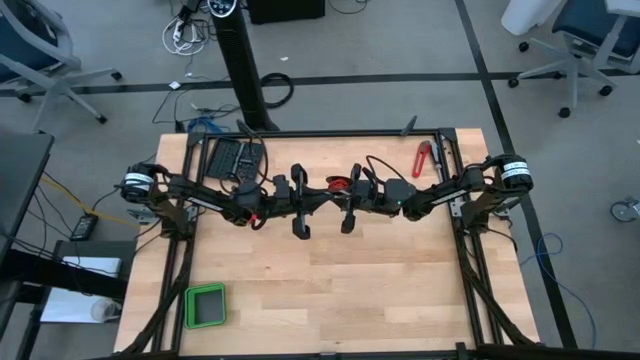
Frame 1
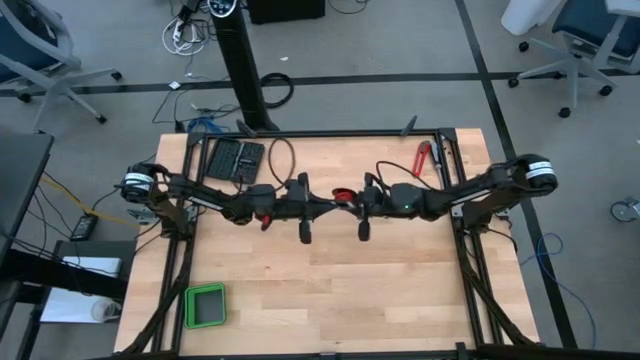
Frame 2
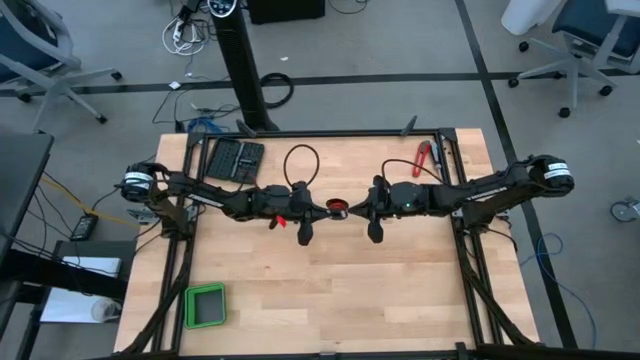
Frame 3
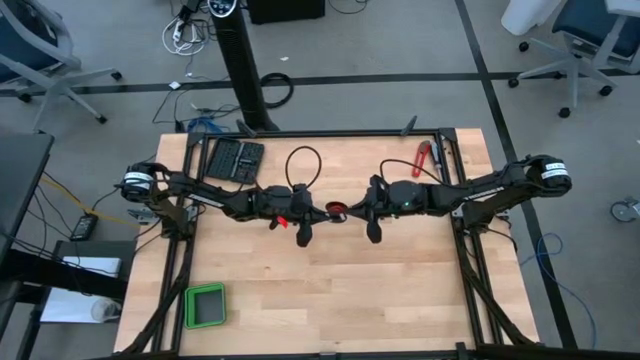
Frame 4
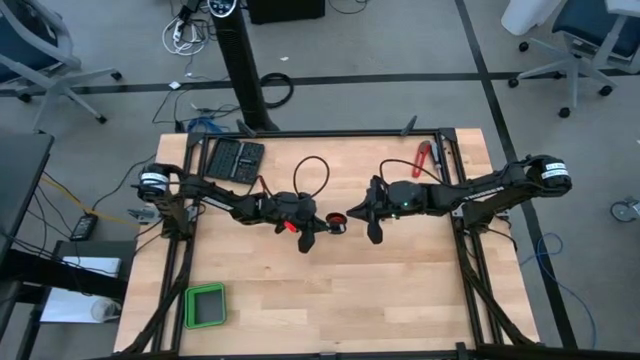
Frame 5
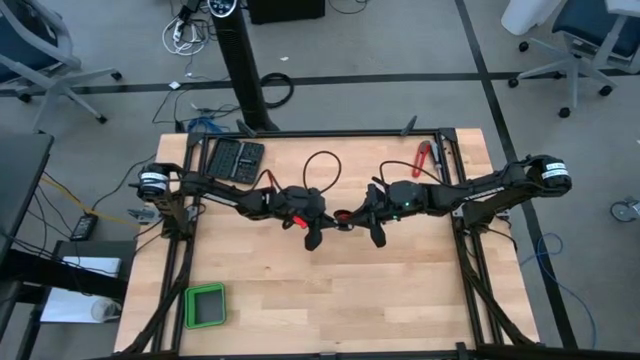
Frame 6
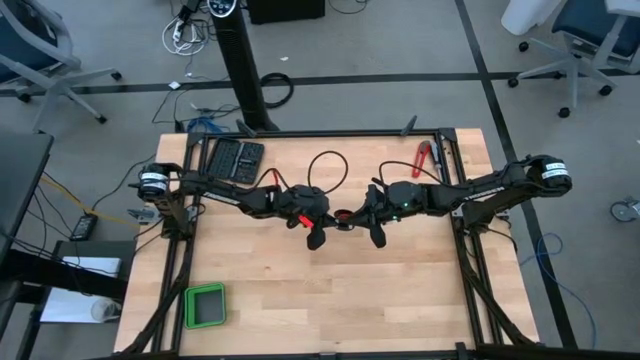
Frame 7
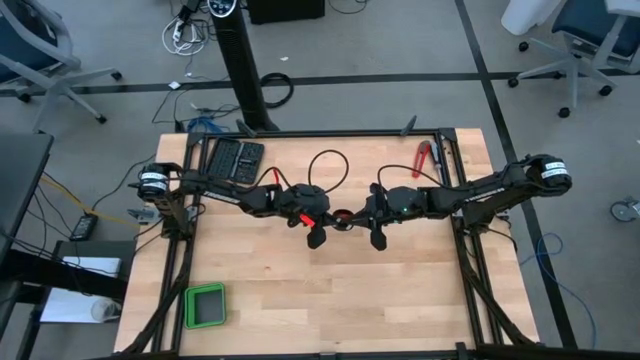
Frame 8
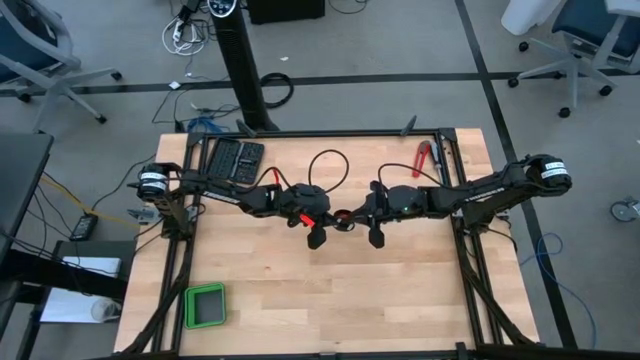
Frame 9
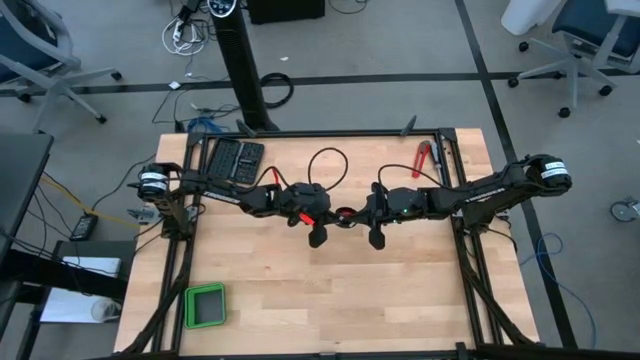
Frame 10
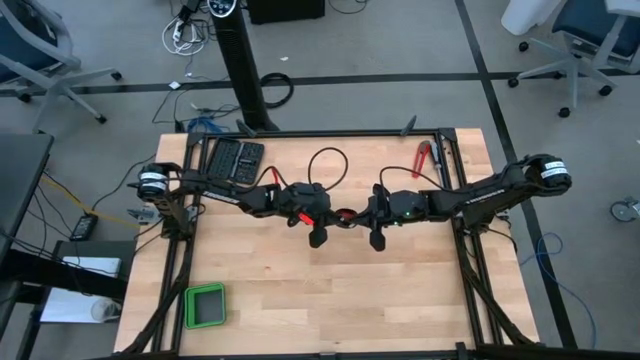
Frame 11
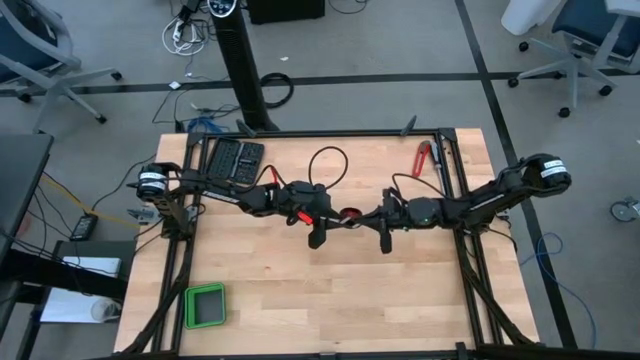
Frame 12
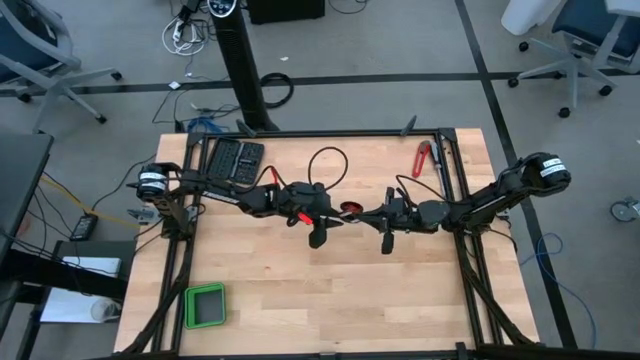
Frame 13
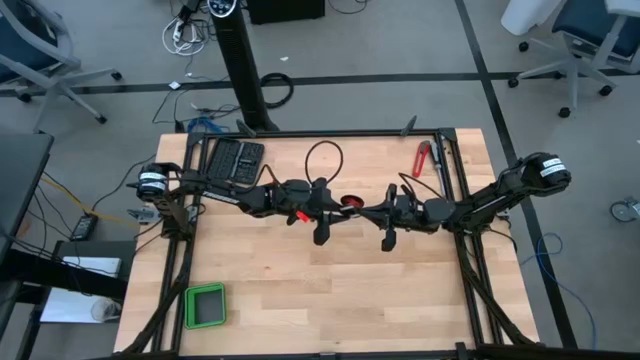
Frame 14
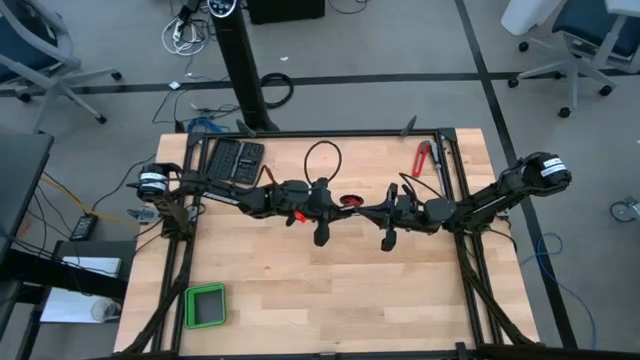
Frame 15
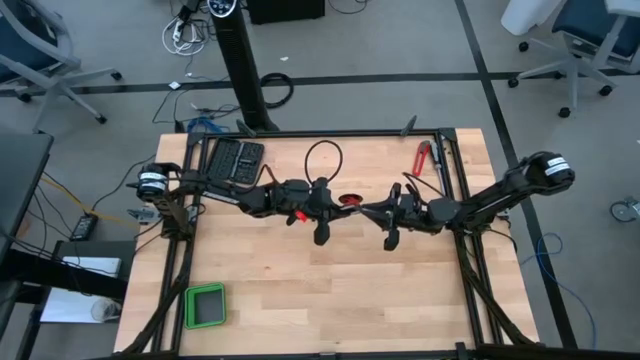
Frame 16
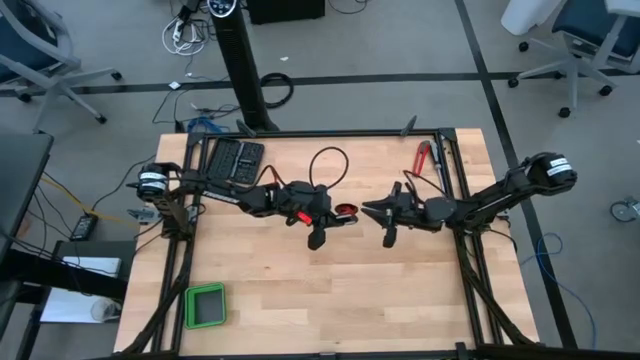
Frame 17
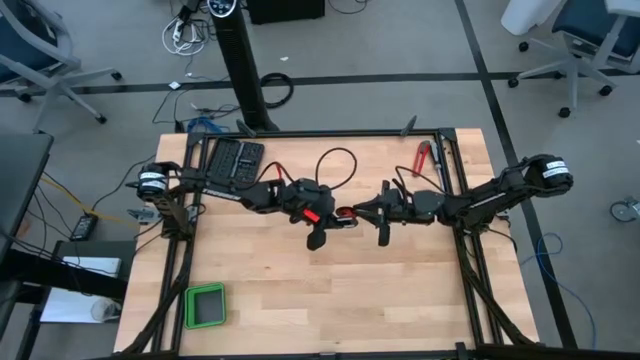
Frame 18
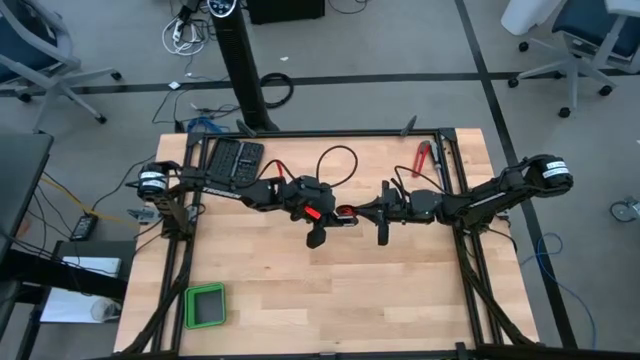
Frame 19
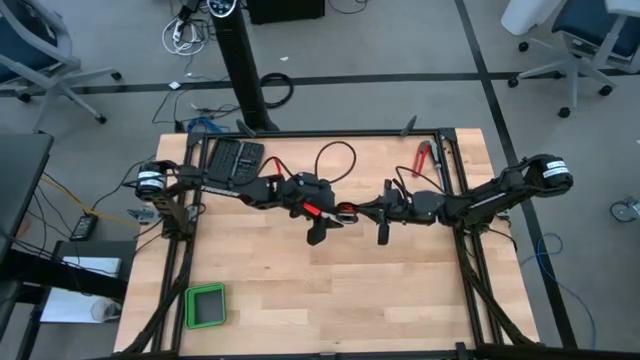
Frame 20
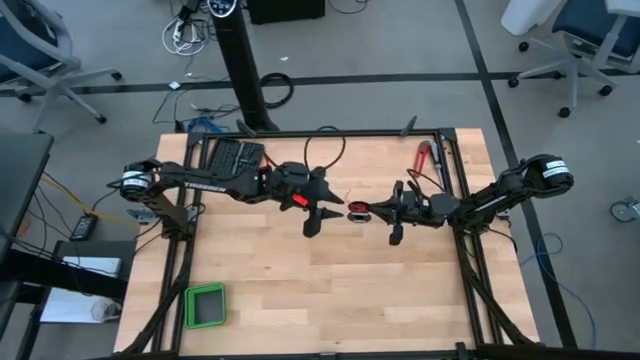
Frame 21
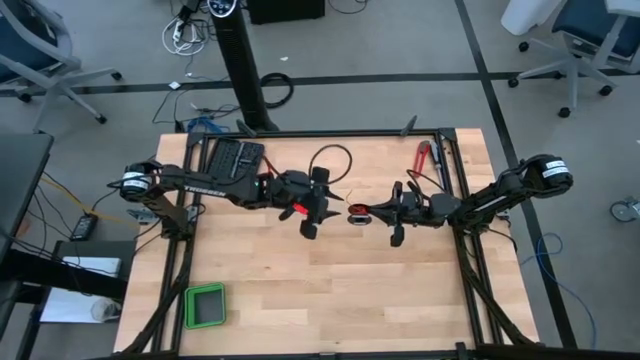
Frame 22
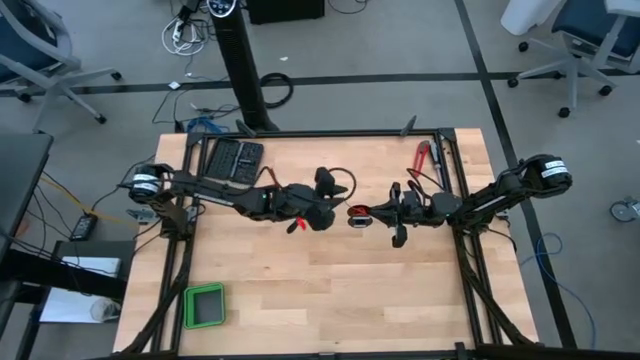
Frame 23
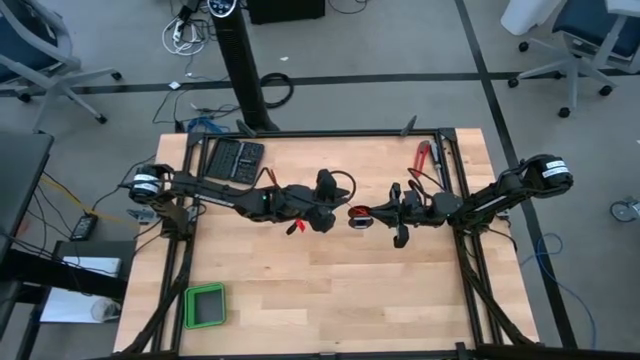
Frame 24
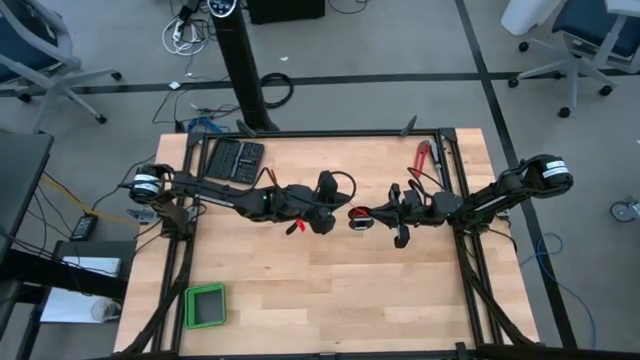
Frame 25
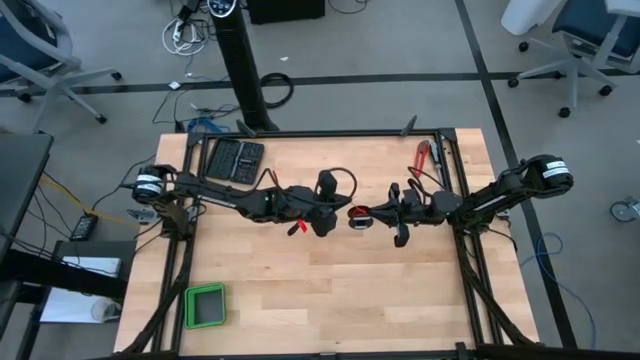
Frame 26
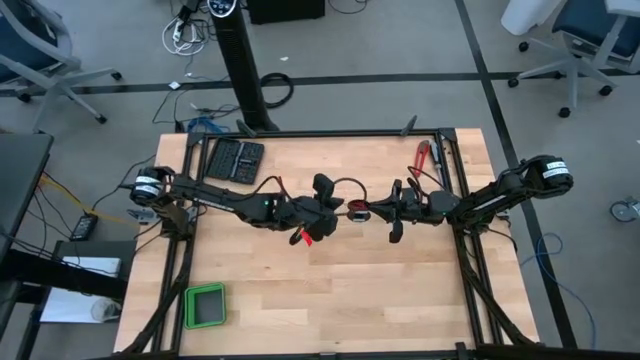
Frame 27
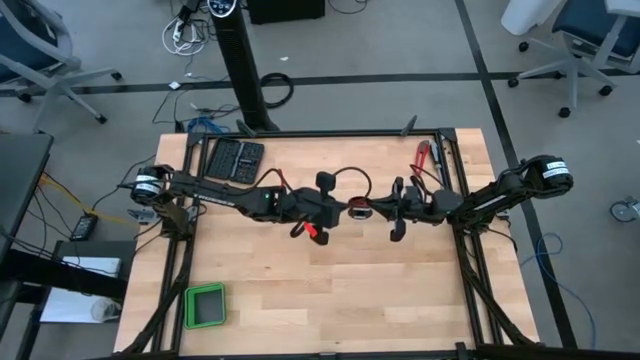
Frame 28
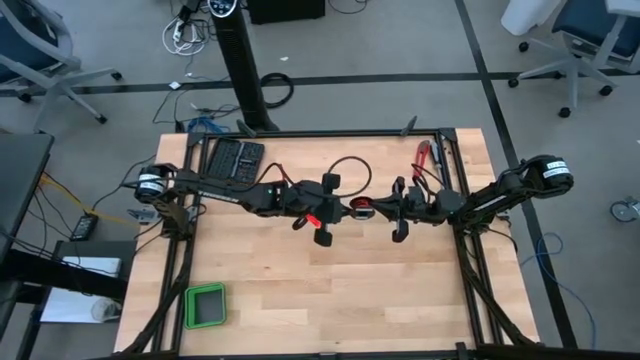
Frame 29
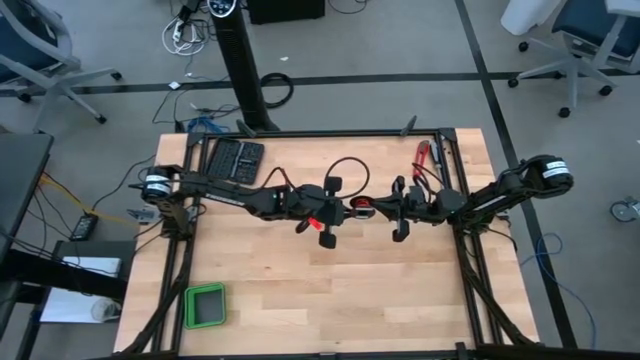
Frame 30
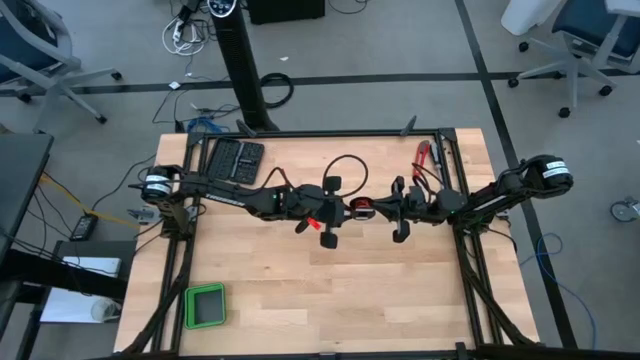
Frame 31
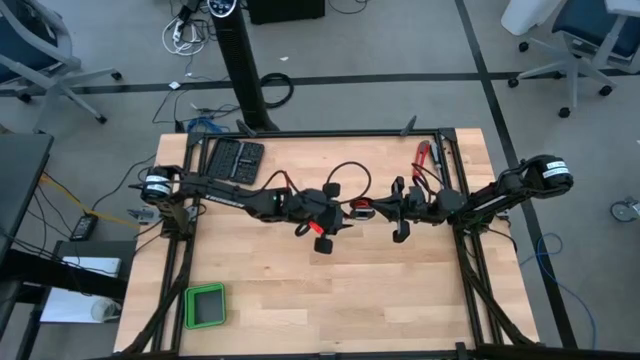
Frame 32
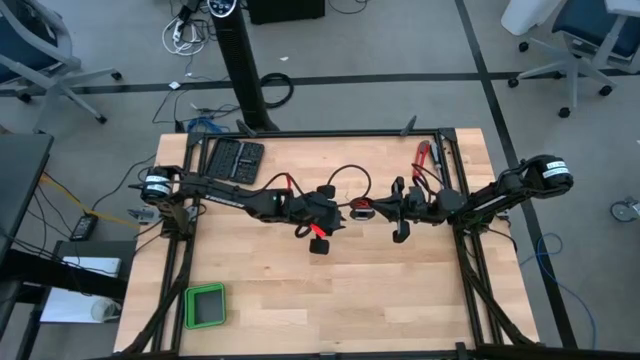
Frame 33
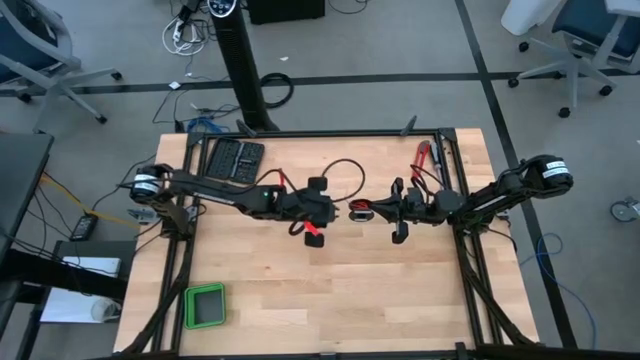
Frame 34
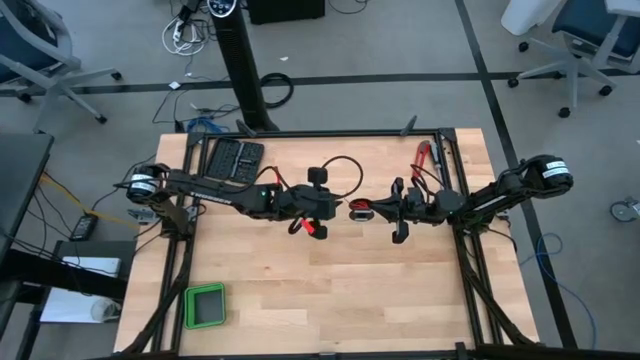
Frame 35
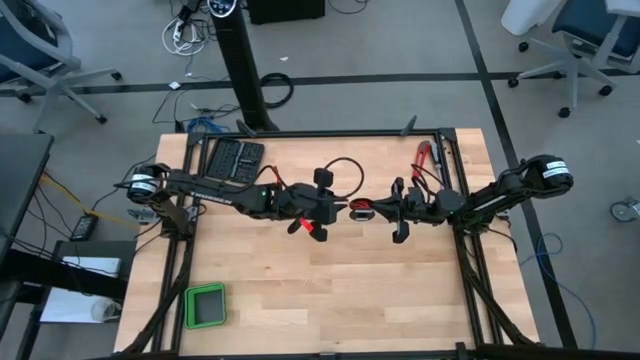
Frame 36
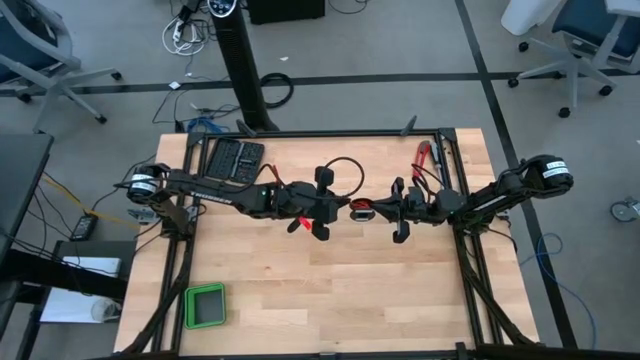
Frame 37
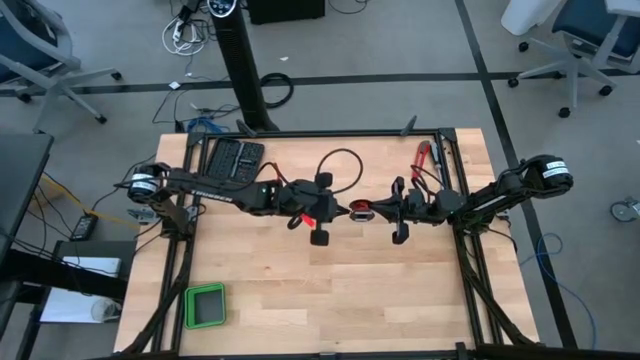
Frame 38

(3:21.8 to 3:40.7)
Task: Coil cords
Coil the red wire onto the black spool

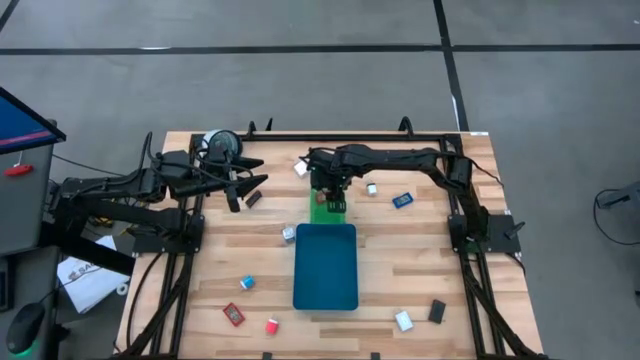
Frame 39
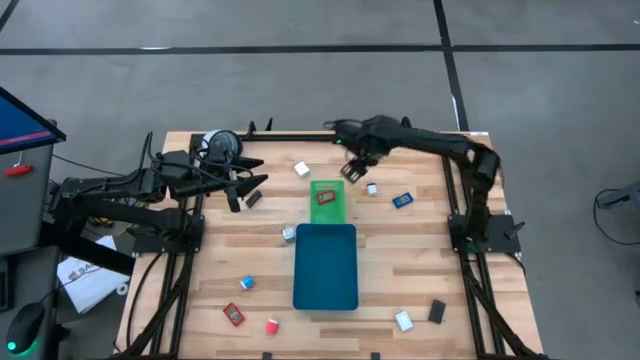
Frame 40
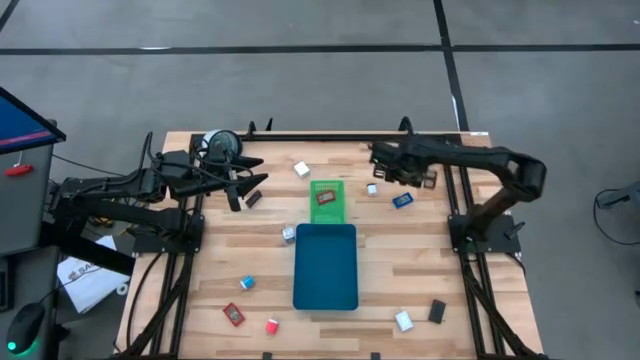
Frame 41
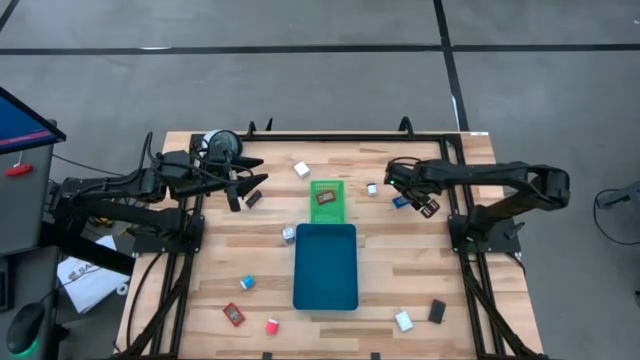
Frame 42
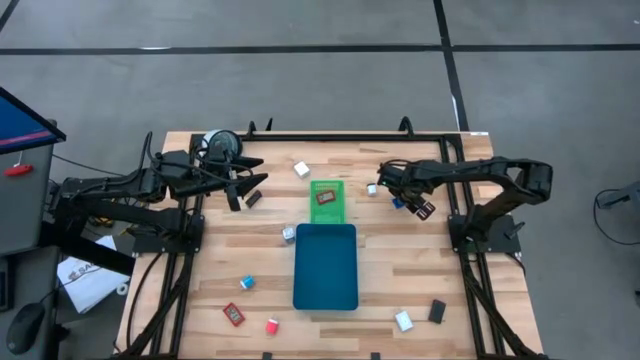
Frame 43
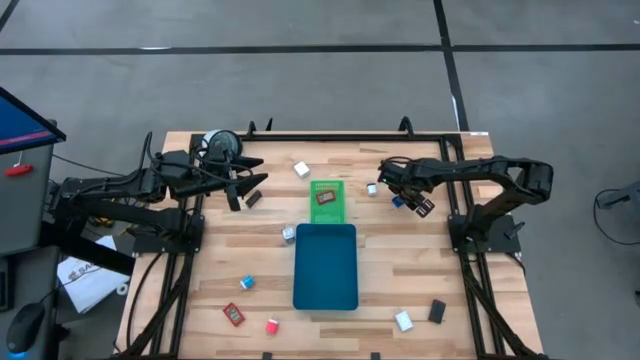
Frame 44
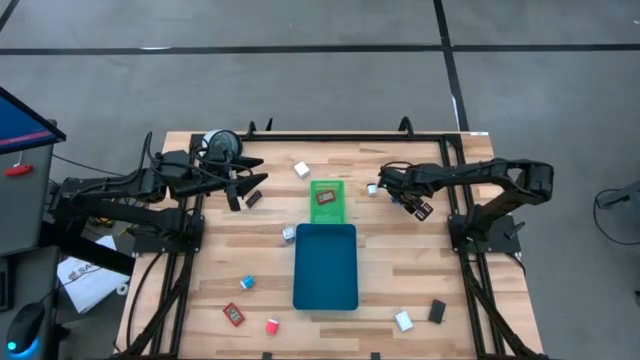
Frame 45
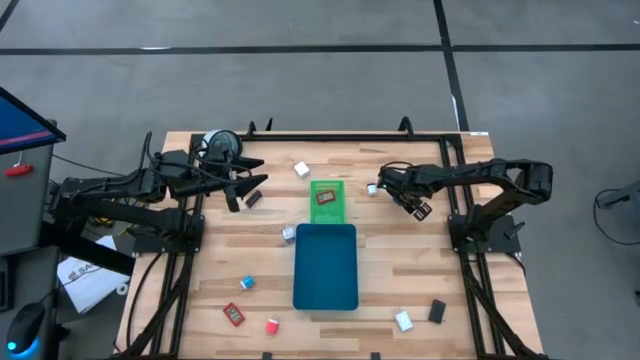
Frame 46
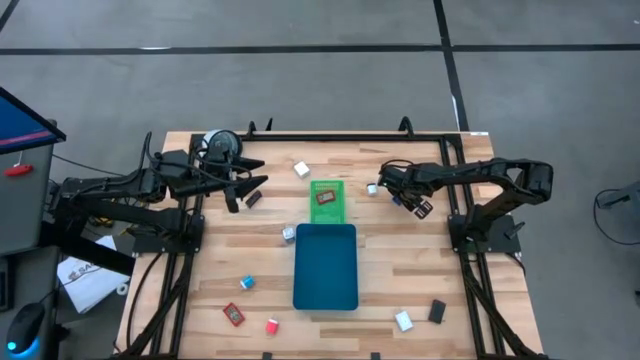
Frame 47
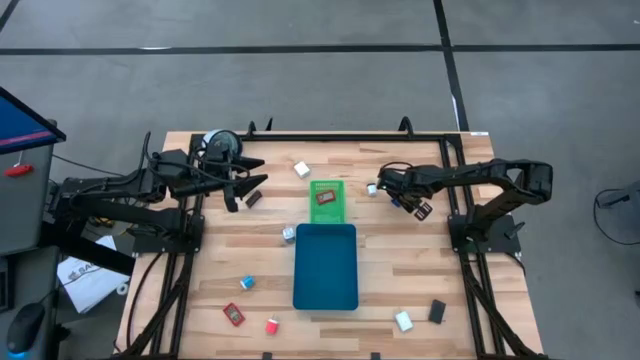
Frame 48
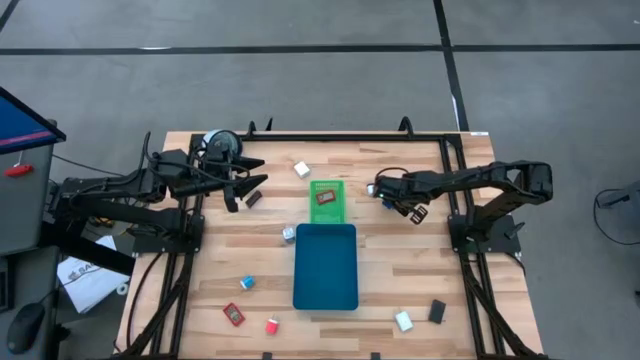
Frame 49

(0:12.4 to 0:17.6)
Task: Pick & Place Office items
Put the blue digital clock into the green bin
